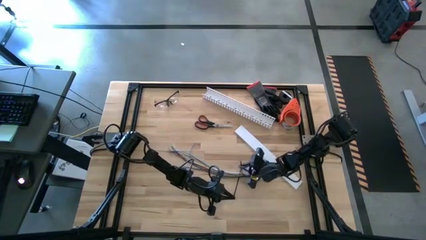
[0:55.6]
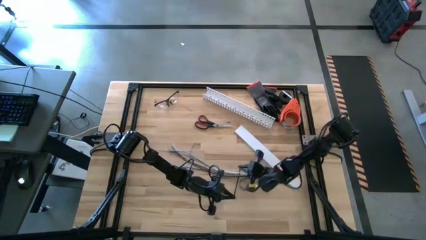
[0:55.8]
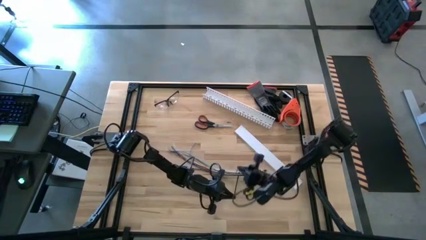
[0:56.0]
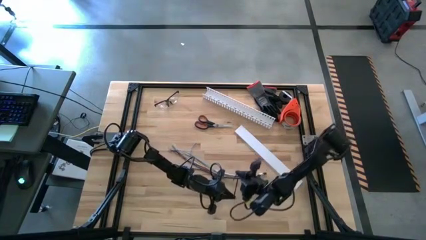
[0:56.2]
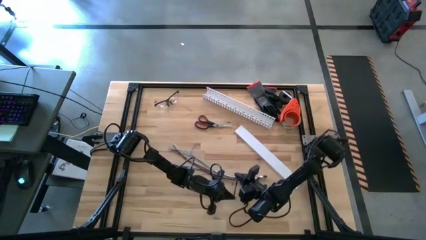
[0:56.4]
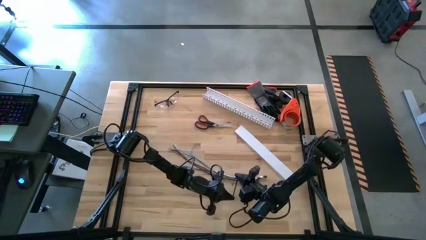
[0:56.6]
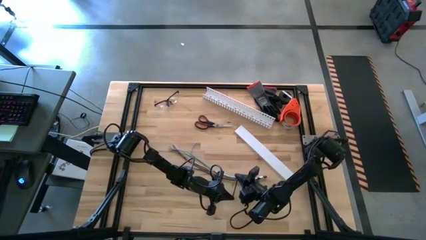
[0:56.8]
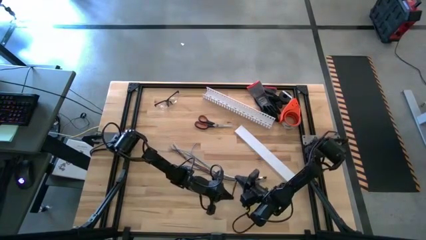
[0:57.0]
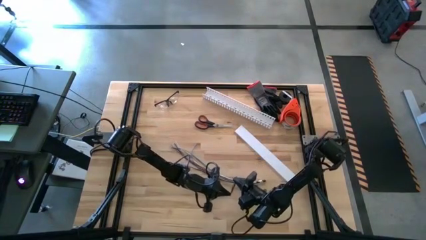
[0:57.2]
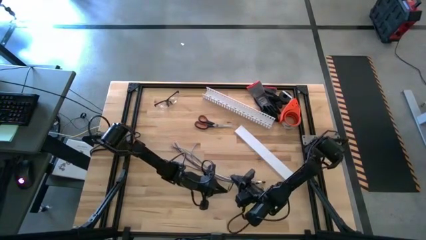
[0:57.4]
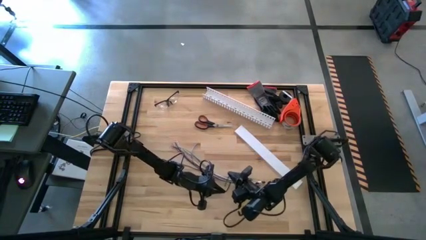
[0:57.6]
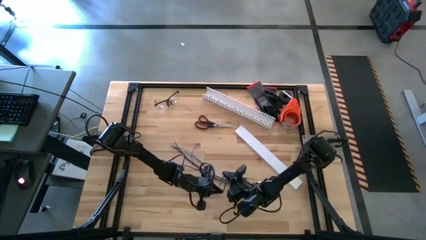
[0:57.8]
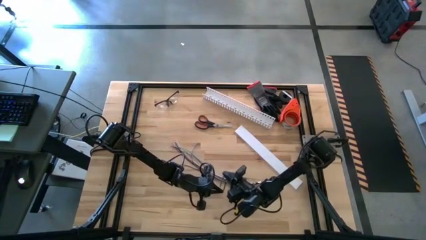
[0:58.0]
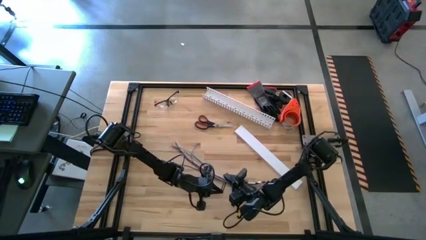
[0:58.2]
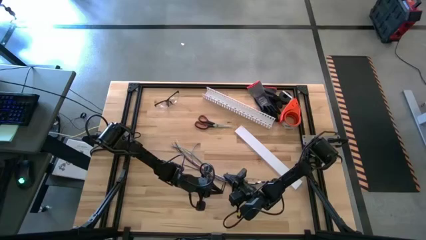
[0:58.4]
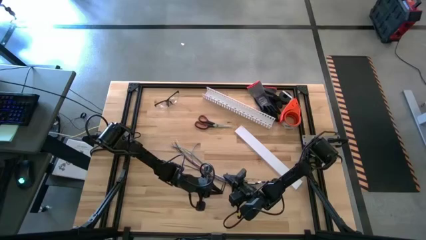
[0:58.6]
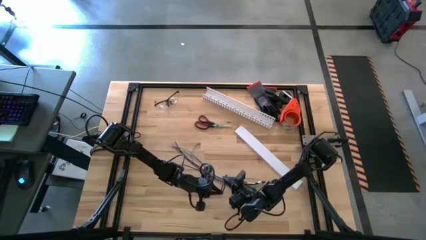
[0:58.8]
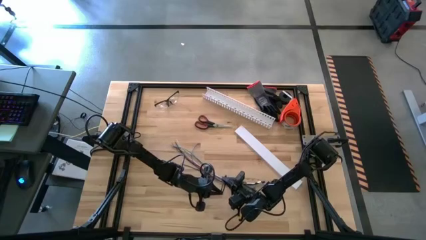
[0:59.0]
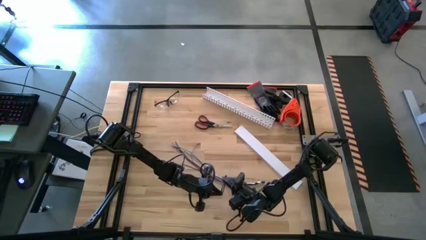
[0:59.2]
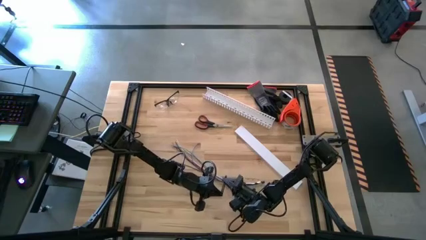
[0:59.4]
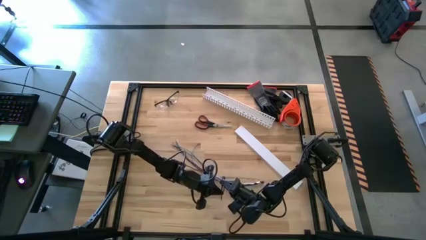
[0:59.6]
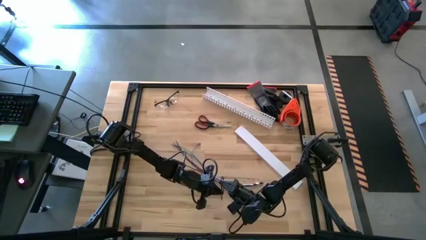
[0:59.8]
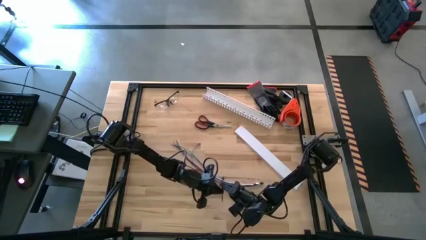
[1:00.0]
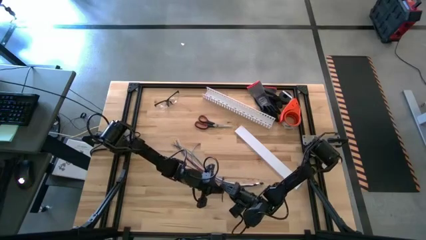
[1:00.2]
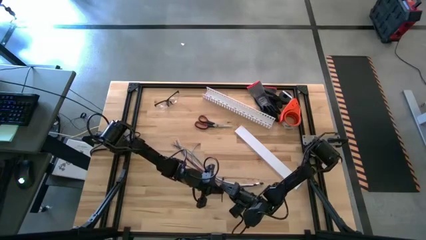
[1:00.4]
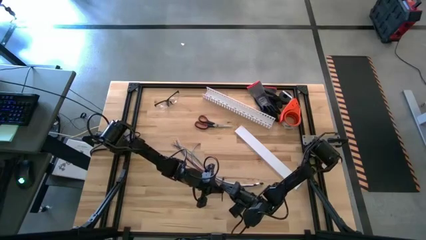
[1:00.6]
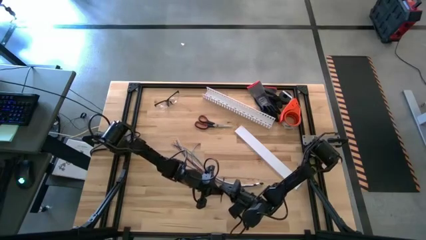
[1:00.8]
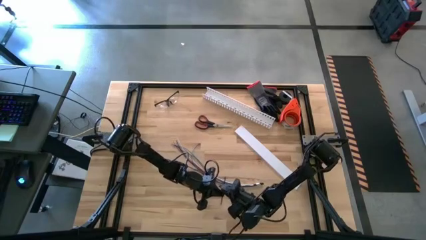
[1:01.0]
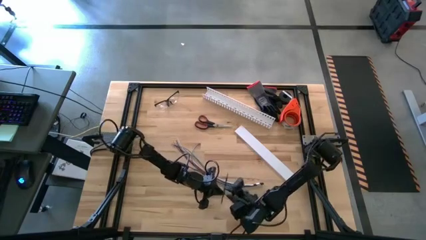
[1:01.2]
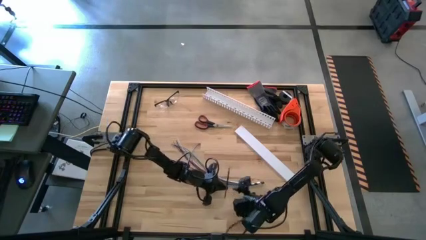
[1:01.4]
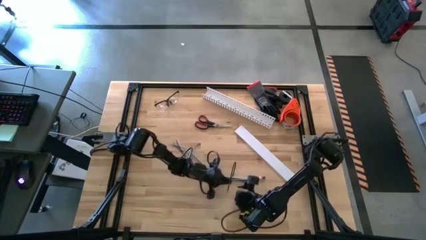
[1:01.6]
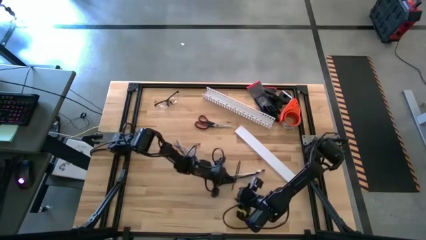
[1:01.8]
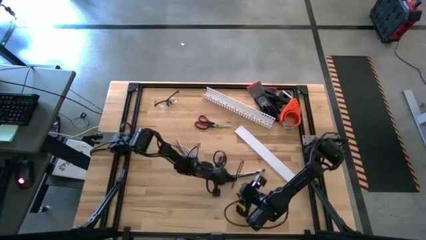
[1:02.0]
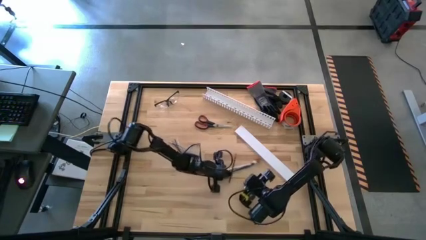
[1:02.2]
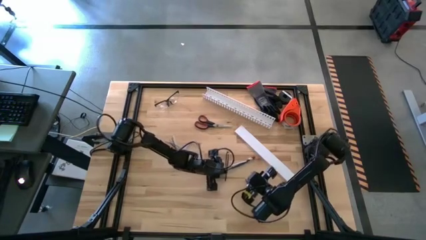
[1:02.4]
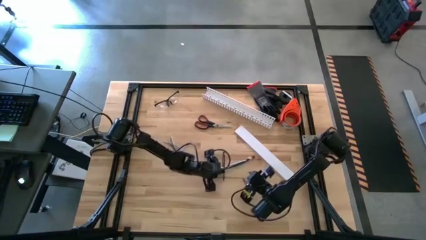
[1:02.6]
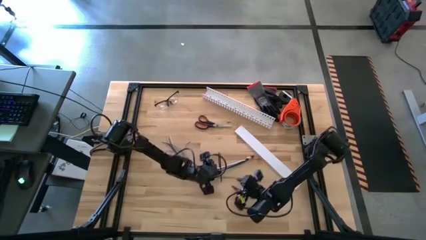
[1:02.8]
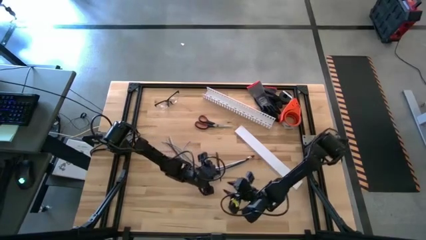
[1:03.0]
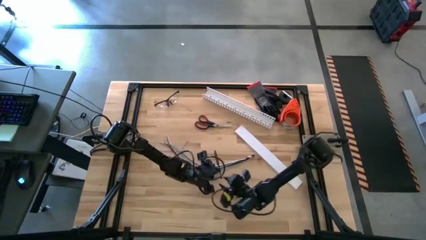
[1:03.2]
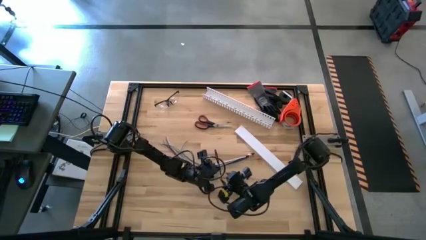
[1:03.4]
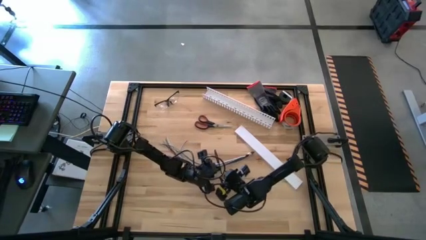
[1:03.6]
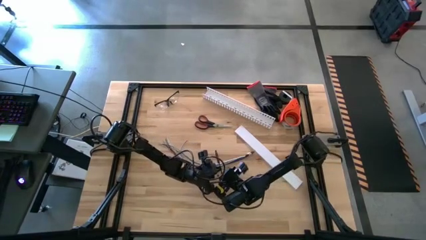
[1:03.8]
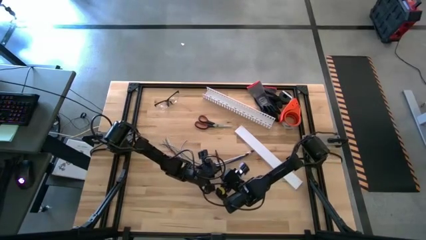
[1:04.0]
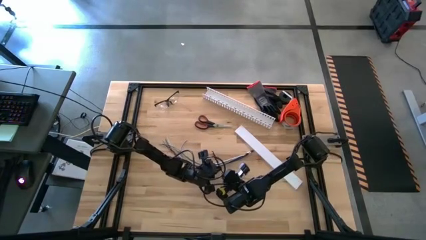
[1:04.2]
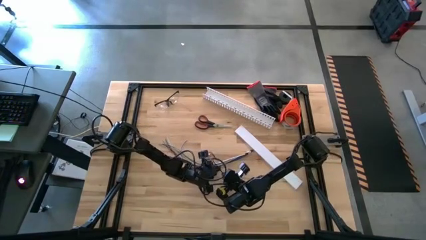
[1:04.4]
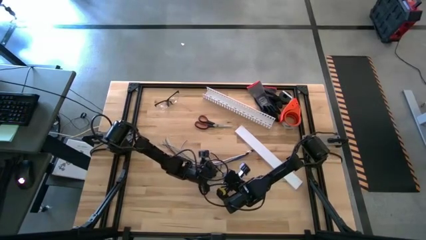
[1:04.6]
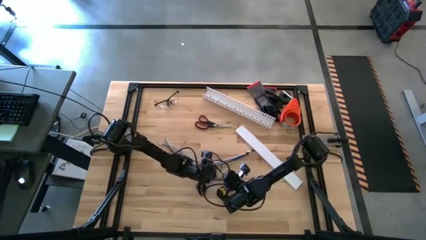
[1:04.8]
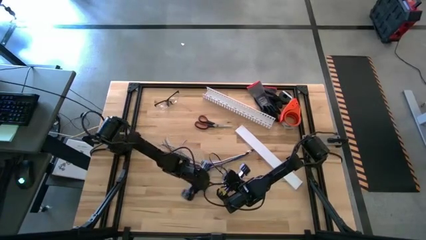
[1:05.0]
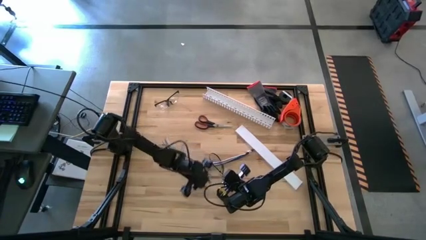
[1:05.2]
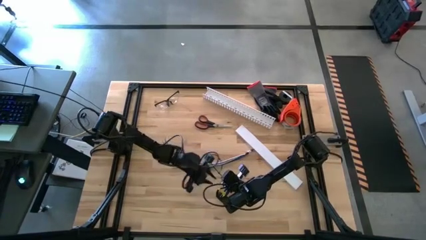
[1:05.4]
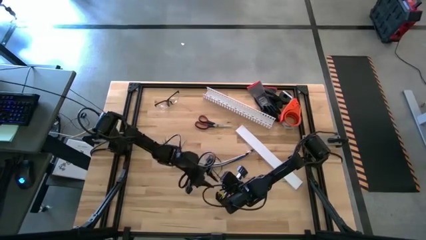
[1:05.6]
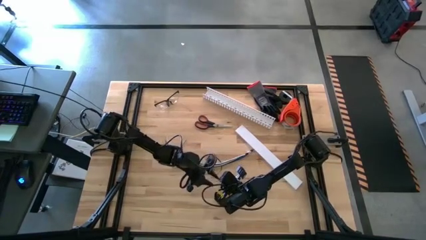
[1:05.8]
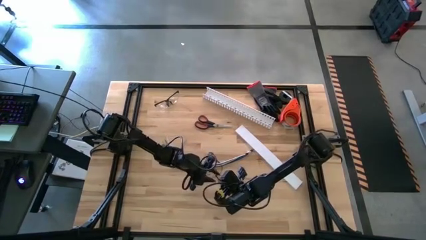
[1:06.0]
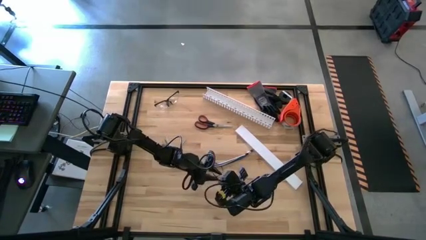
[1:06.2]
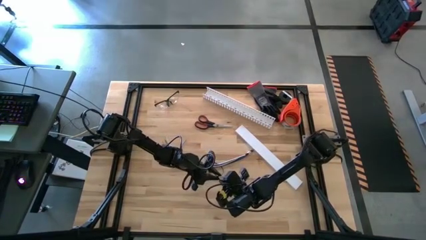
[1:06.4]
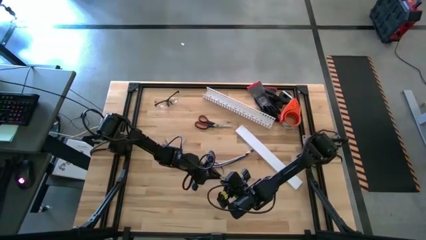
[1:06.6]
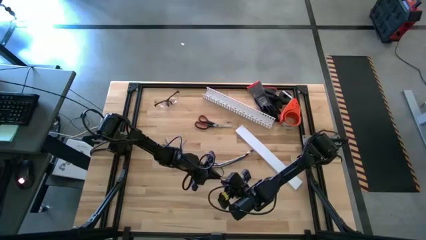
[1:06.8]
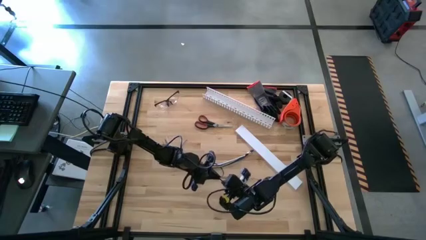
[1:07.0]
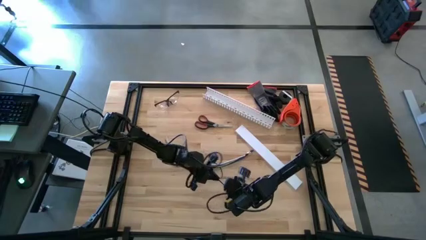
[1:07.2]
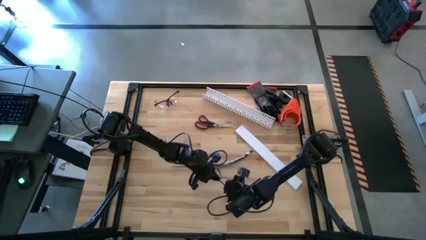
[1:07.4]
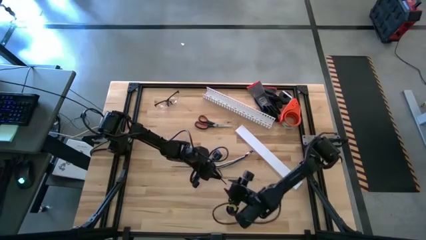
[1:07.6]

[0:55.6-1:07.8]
Task: Ziptie cables
Wrap the cable wires with a black ziptie

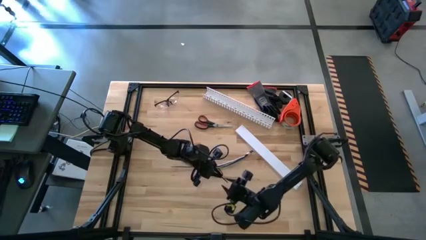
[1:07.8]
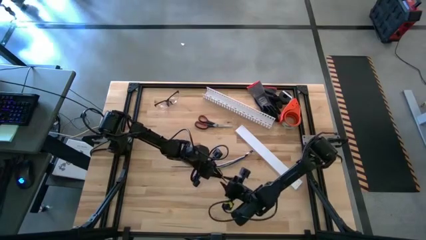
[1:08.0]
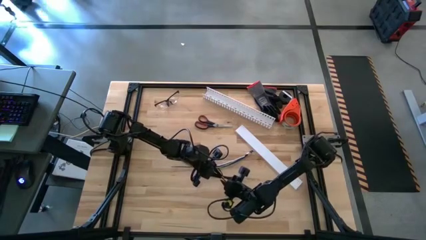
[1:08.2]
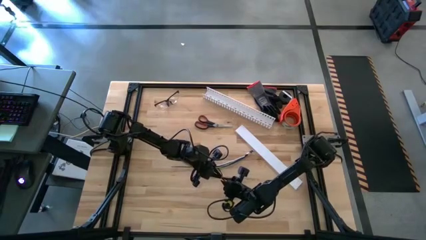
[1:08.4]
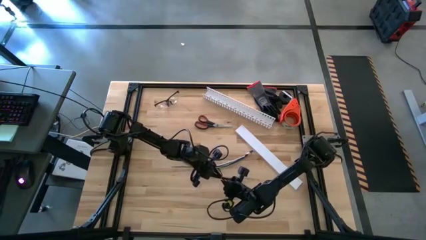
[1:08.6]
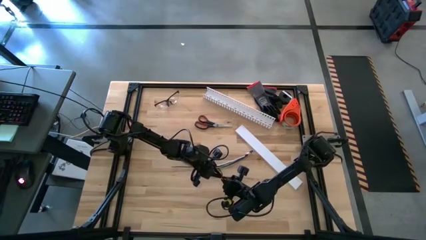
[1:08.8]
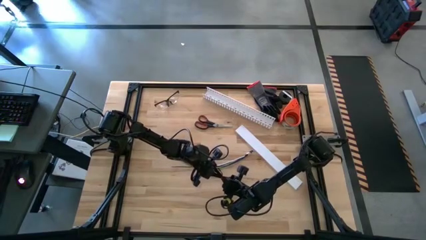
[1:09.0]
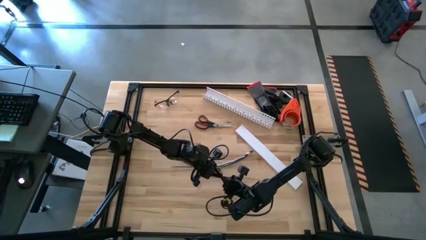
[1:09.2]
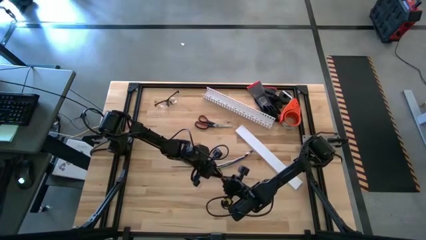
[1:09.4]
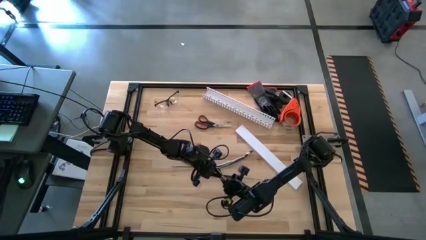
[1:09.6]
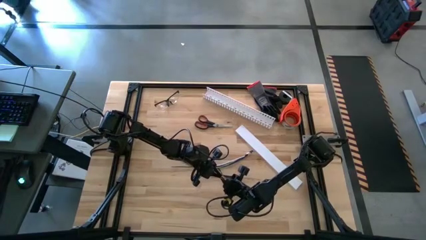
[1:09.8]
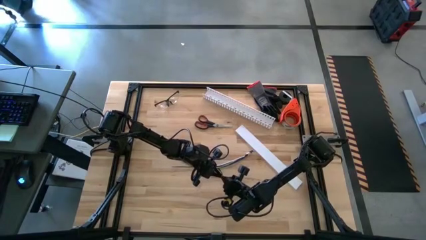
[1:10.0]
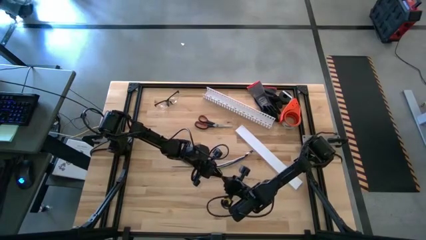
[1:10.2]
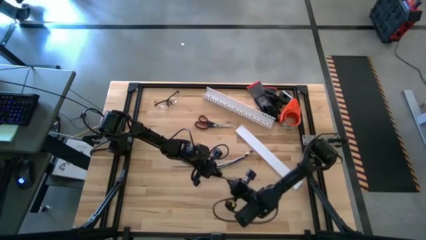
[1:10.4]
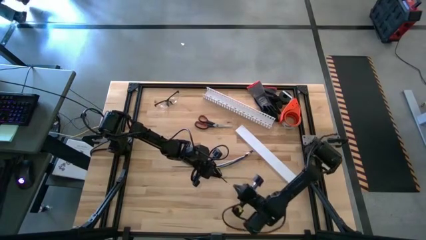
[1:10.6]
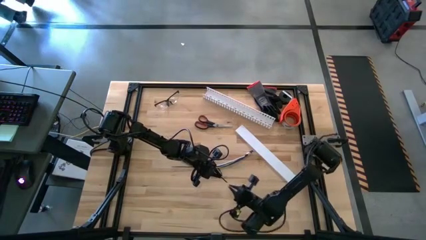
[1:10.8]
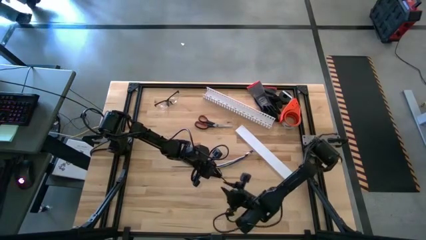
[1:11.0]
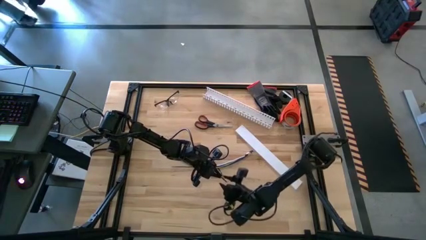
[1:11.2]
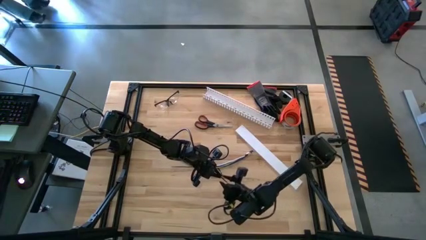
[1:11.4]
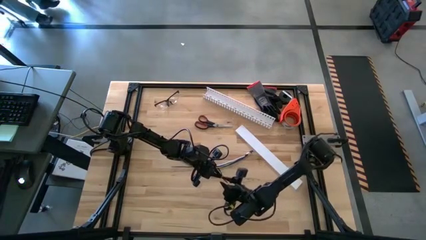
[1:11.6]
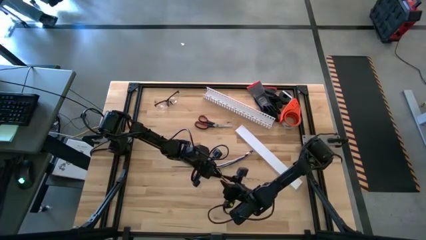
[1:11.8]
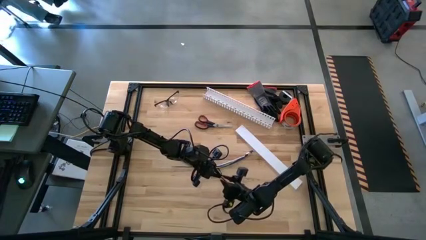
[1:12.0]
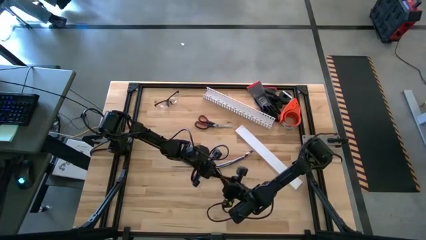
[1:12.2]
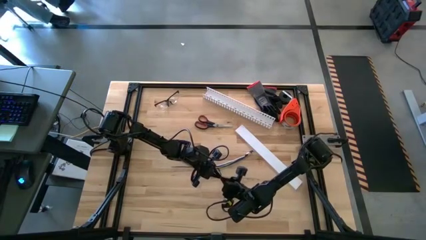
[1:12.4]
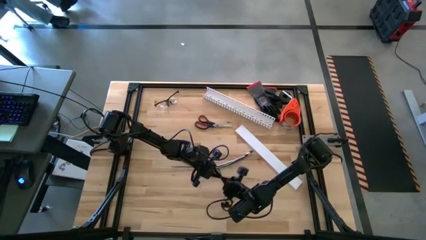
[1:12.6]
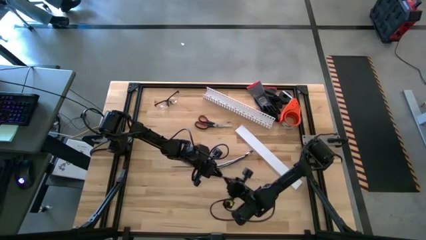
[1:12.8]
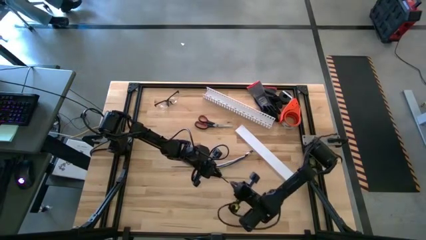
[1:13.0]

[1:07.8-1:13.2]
Wrap the cable wires with a black ziptie
